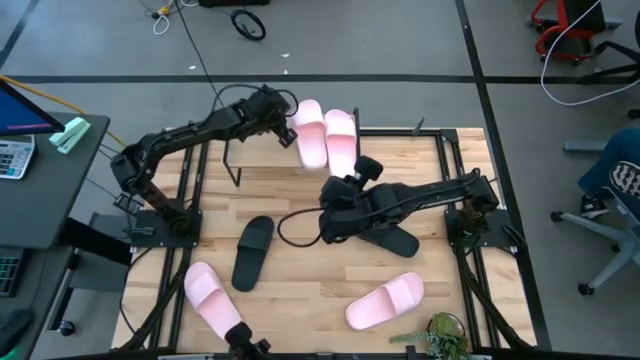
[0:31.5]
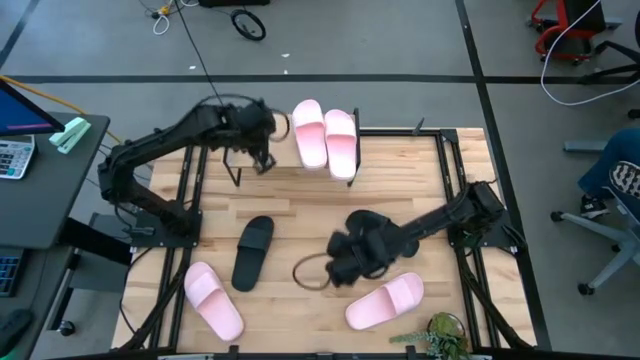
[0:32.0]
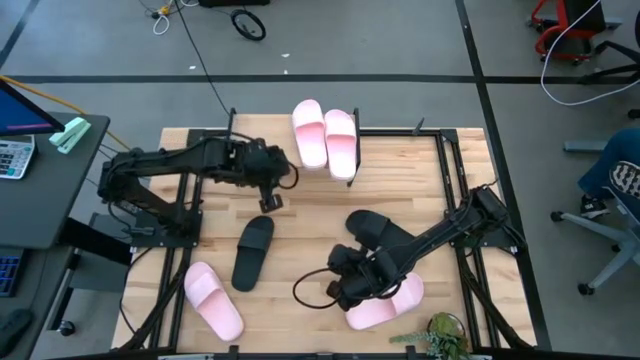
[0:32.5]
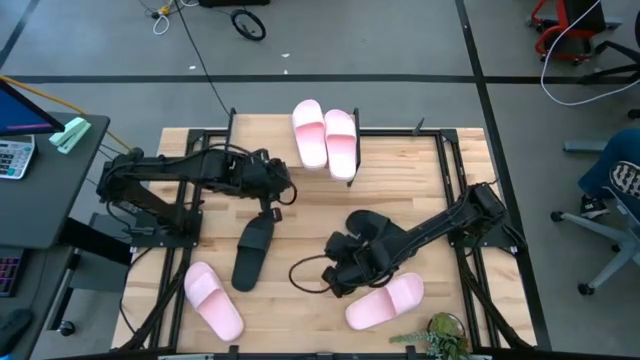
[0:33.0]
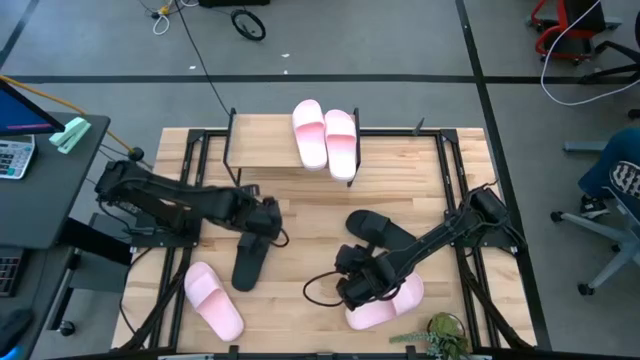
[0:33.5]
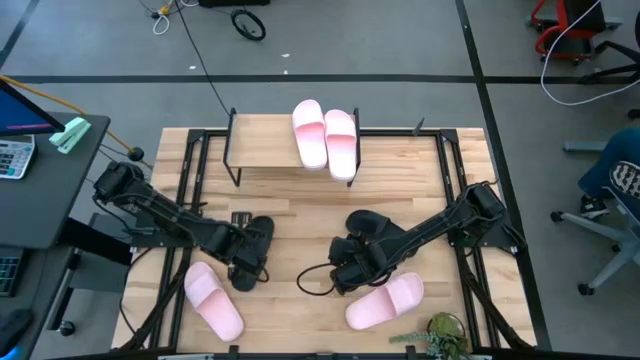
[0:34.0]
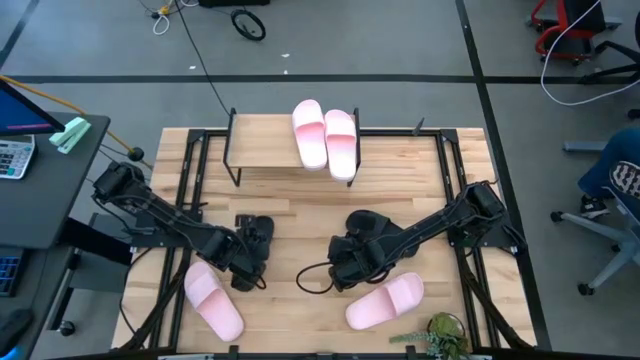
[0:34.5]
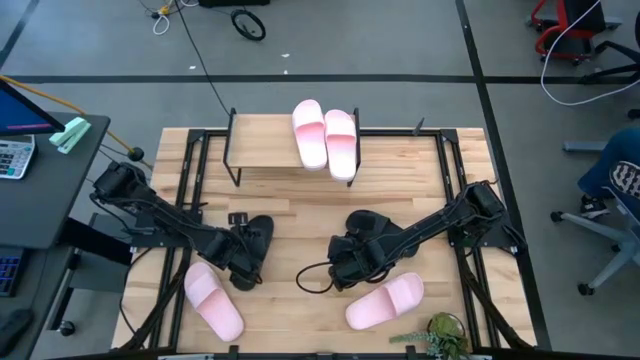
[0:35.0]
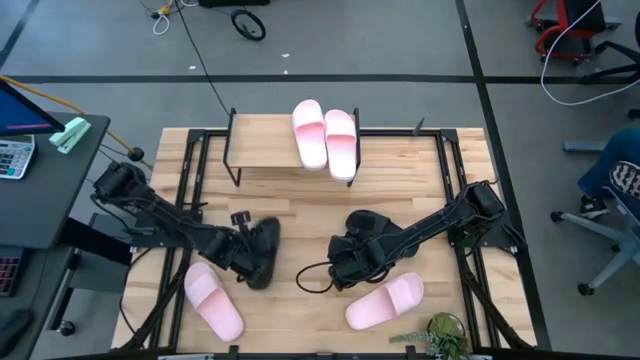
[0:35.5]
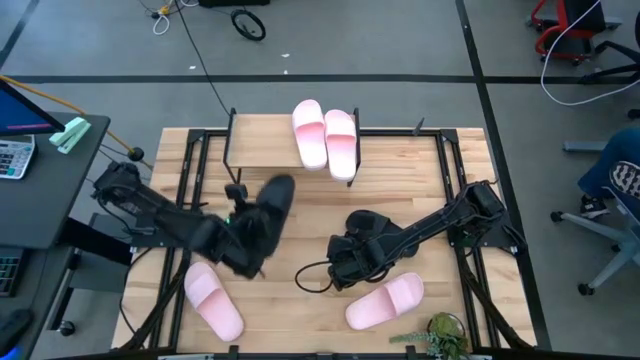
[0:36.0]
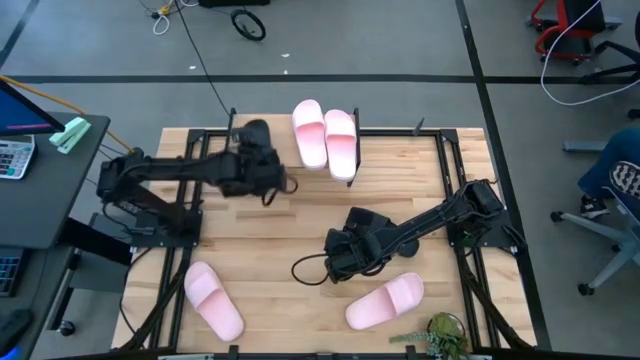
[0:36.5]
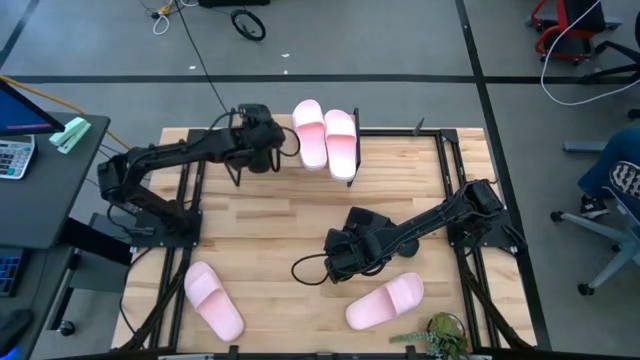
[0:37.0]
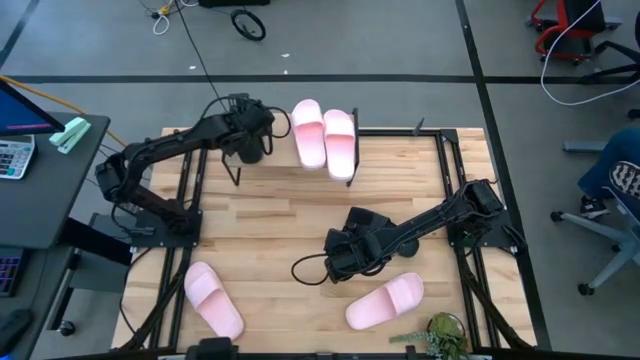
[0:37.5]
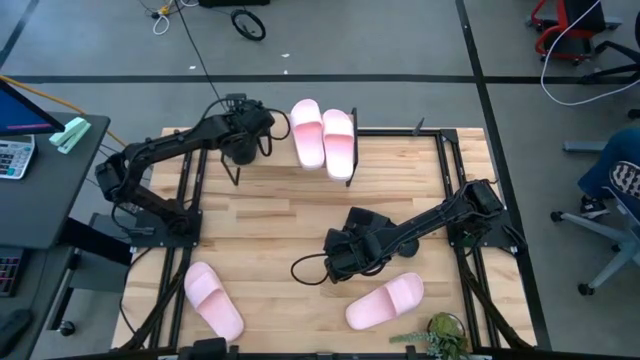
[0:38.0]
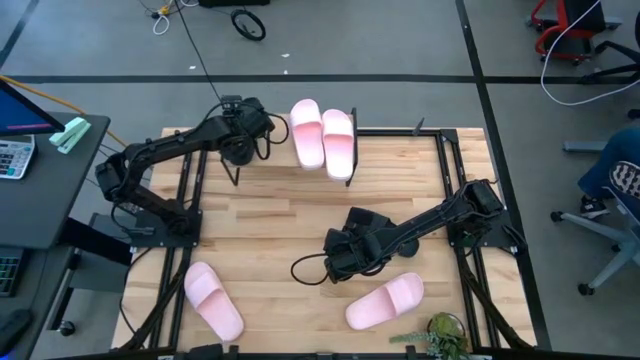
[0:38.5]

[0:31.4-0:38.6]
Task: Pick and place slides into the shelf
Put the left black slipper on the shelf

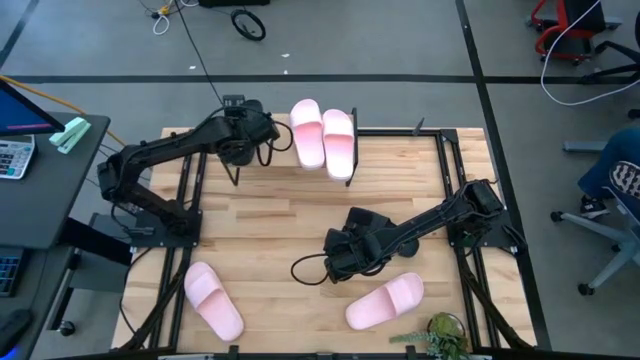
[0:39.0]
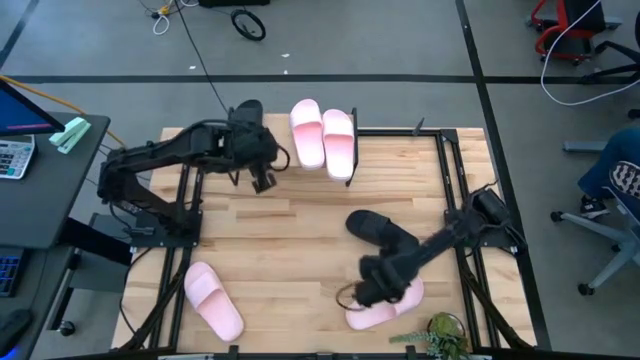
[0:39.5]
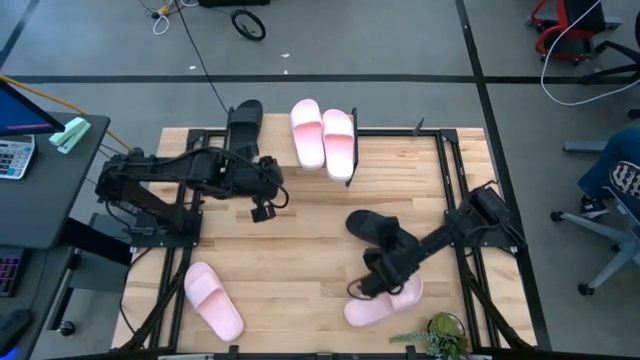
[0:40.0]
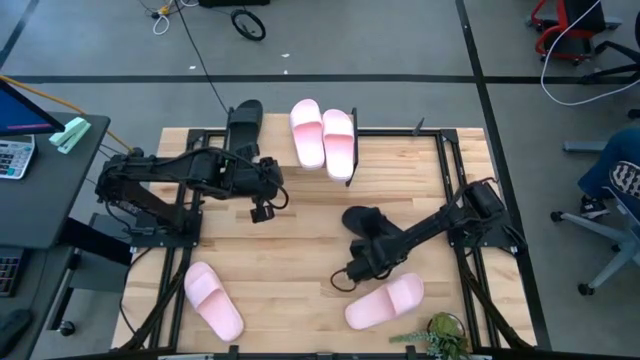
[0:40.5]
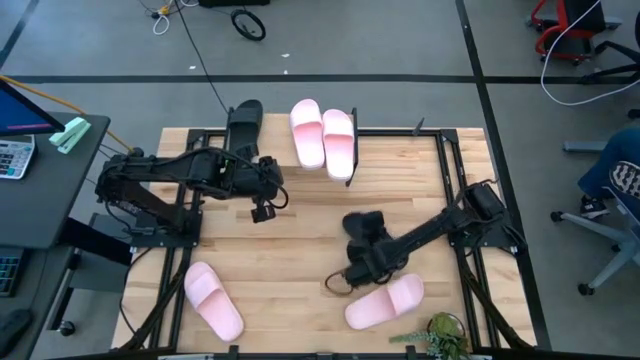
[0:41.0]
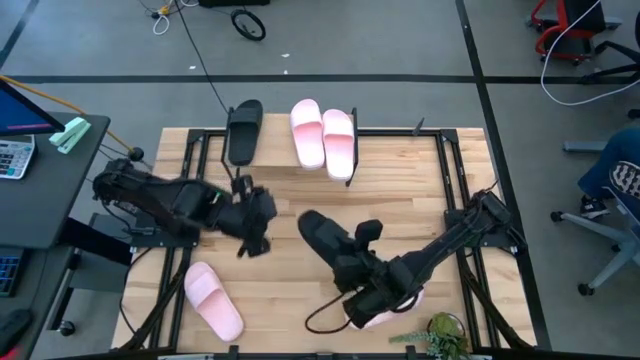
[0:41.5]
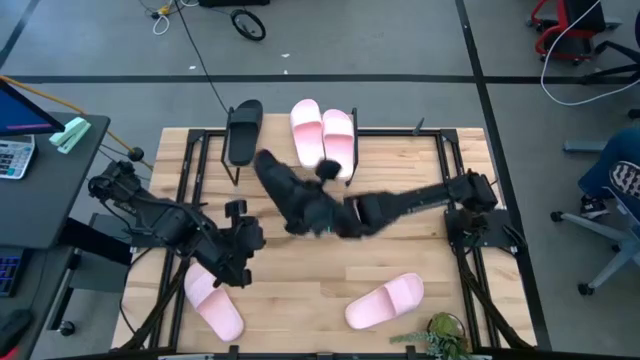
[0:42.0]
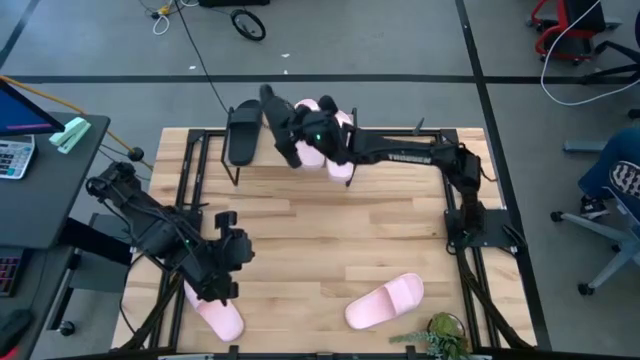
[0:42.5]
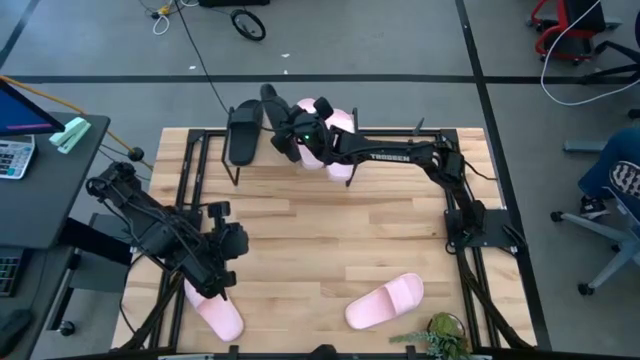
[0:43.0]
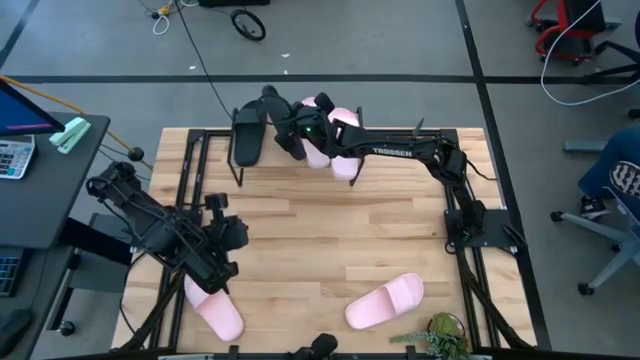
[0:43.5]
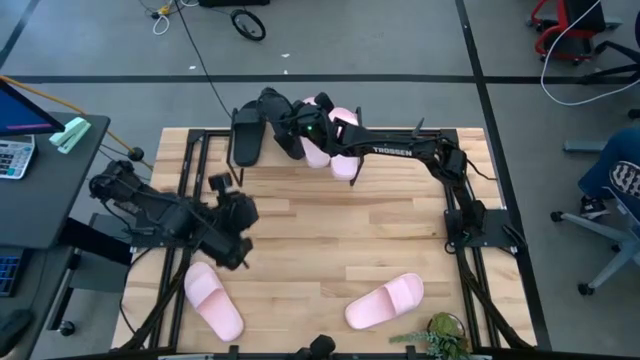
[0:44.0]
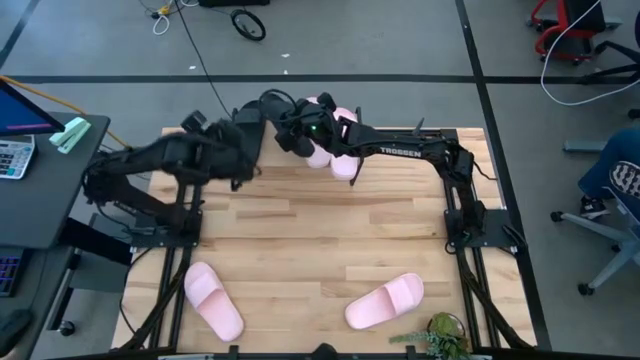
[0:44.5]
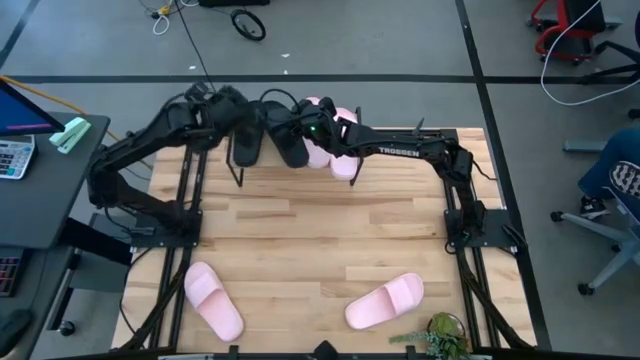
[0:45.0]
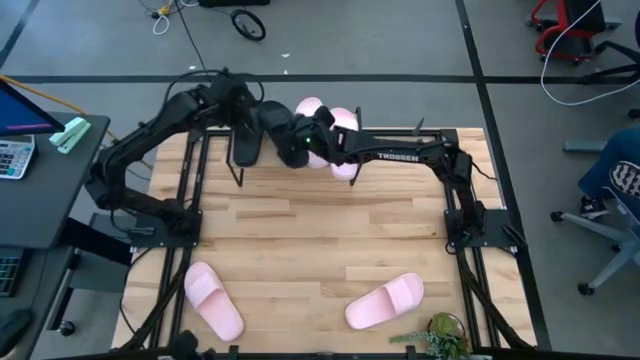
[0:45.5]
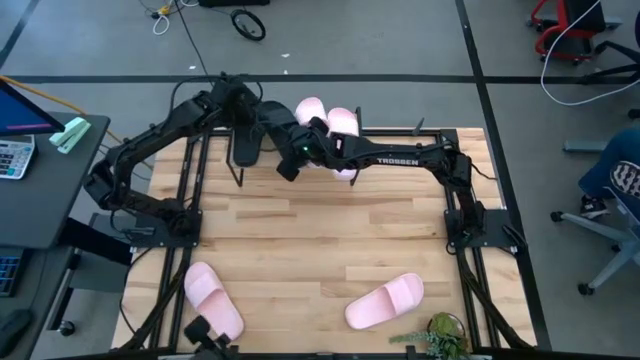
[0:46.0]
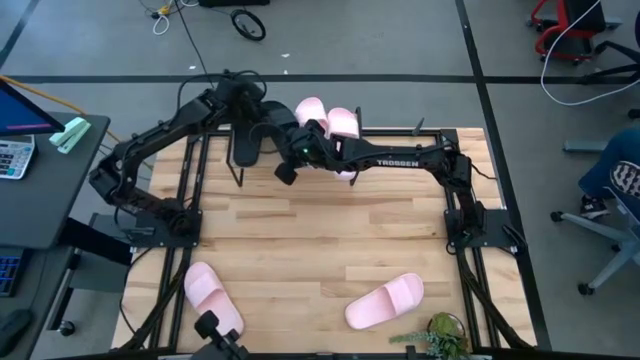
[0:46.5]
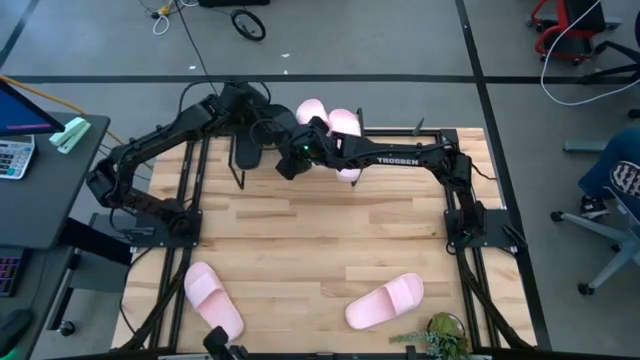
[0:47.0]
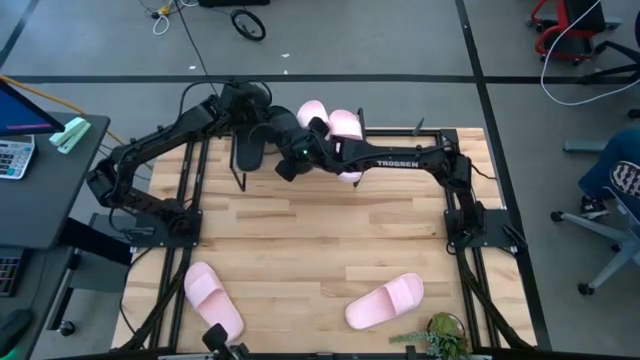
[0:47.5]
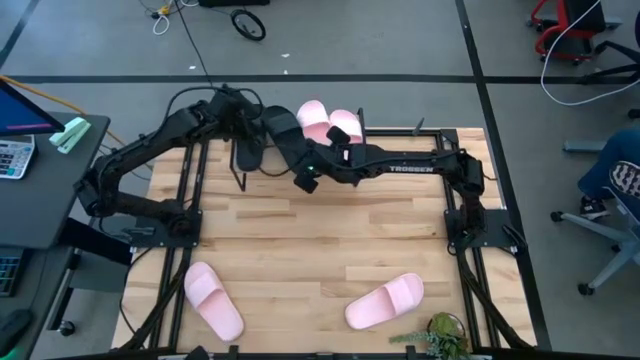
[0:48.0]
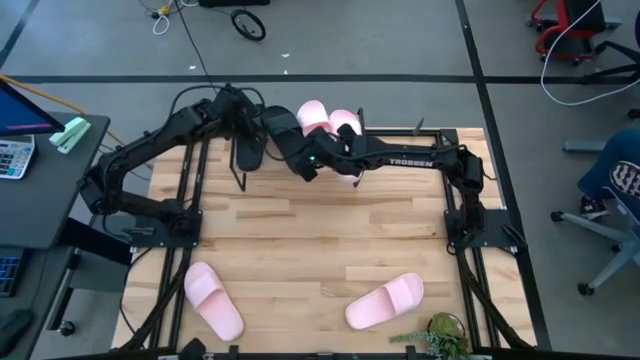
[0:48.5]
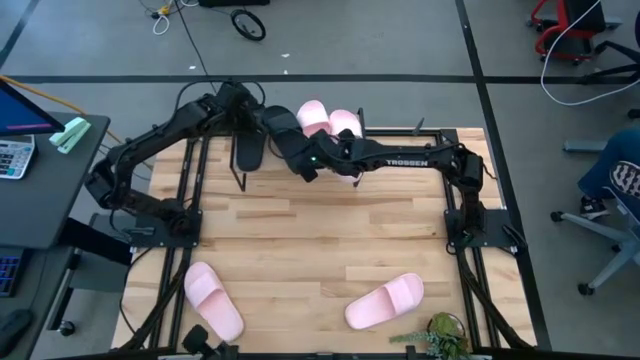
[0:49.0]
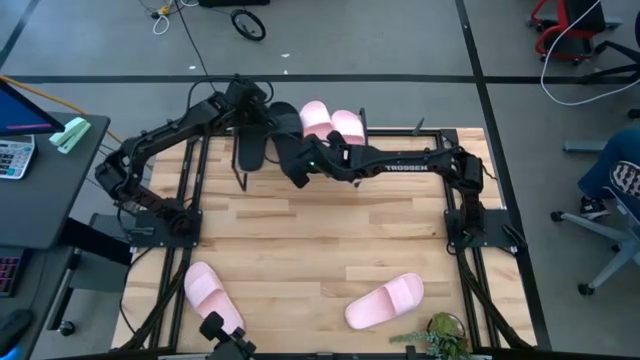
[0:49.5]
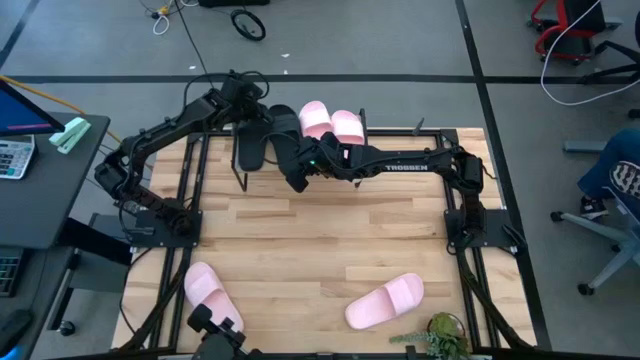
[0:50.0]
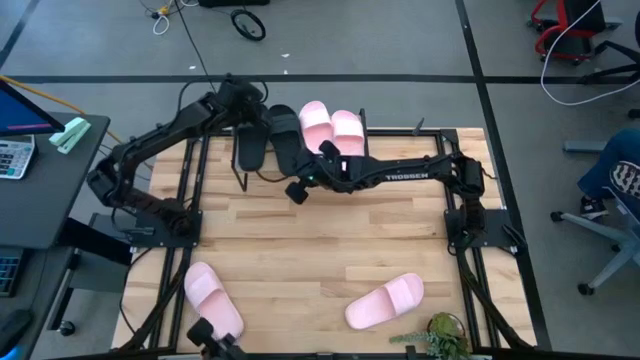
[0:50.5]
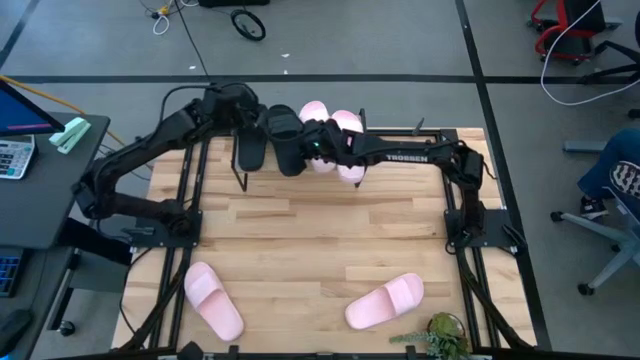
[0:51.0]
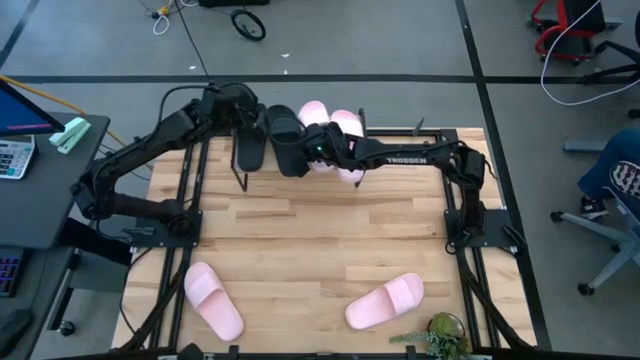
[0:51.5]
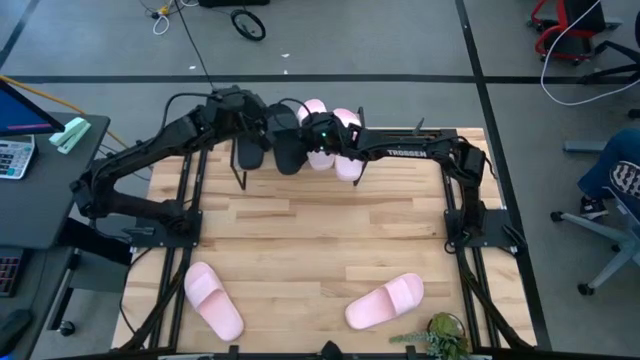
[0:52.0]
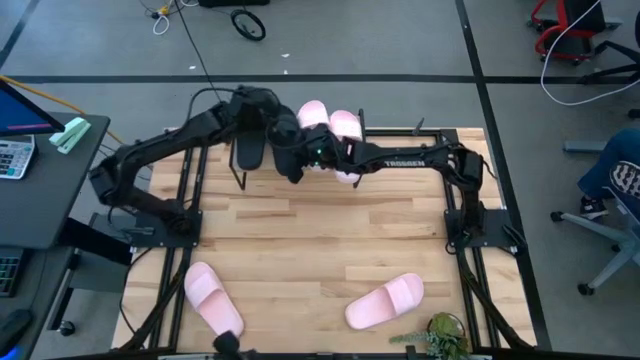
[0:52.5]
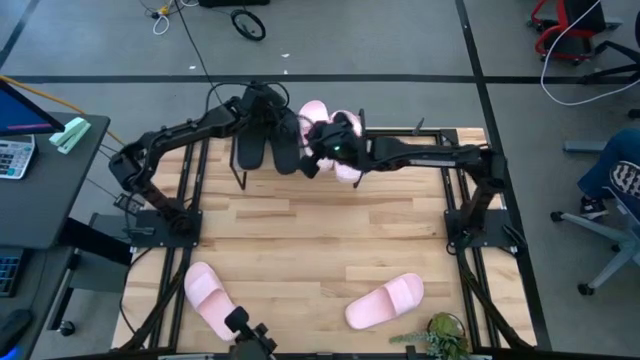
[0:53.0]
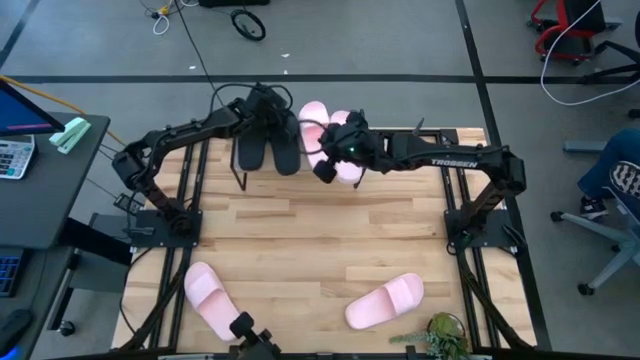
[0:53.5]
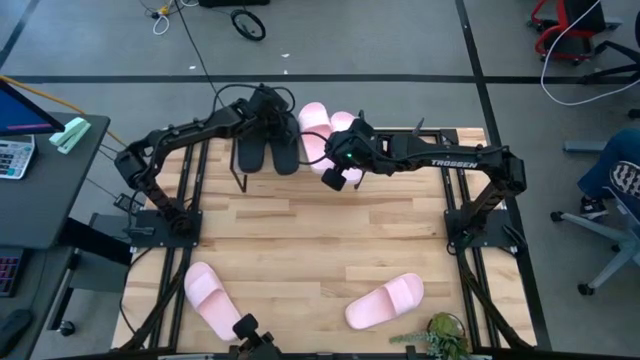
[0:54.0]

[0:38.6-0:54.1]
Put the black slipper on the shelf
